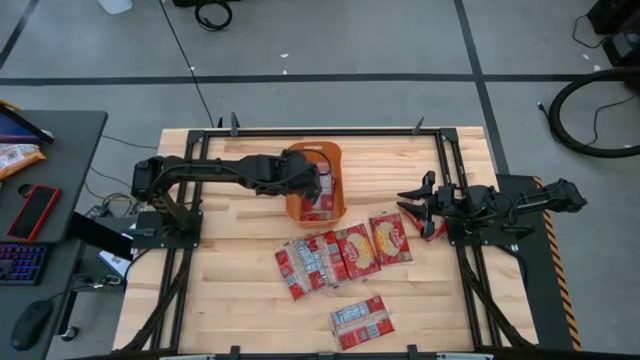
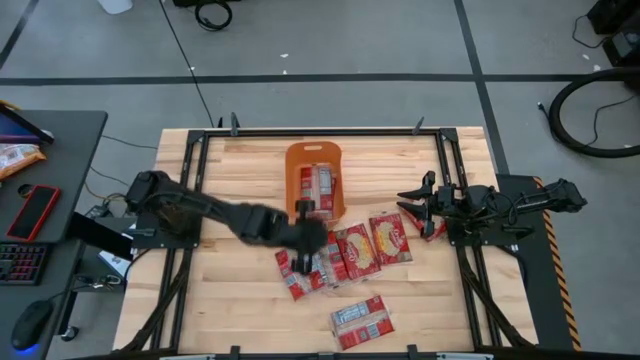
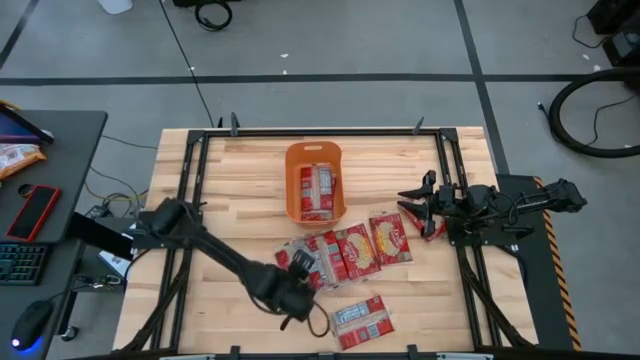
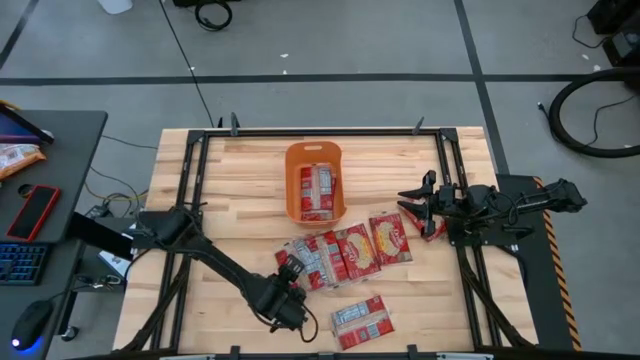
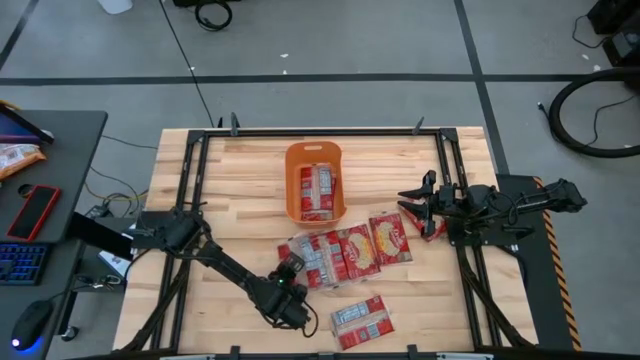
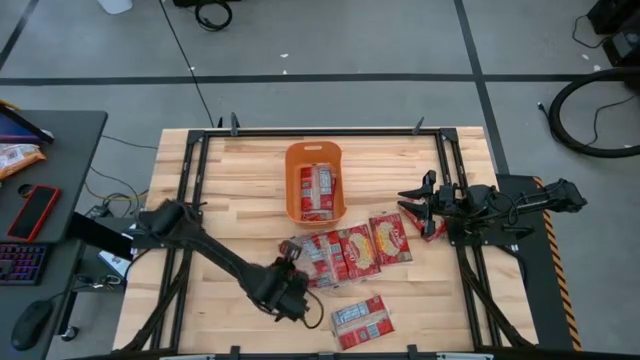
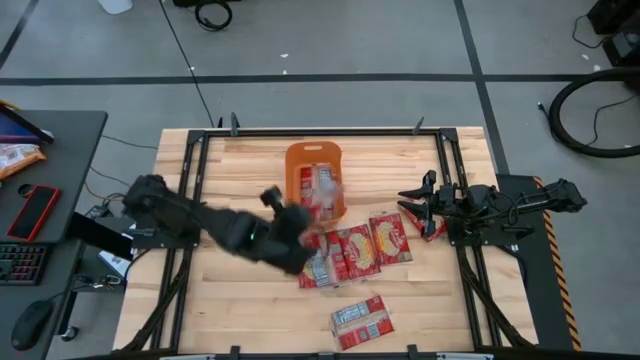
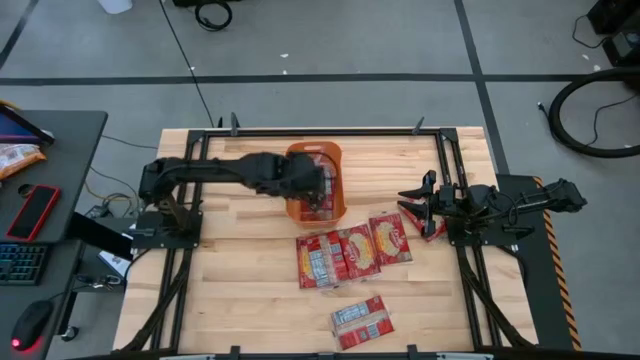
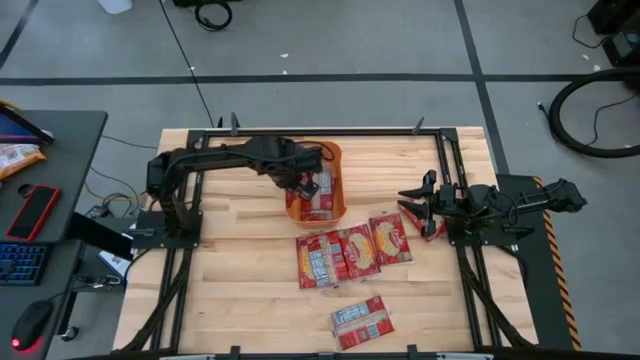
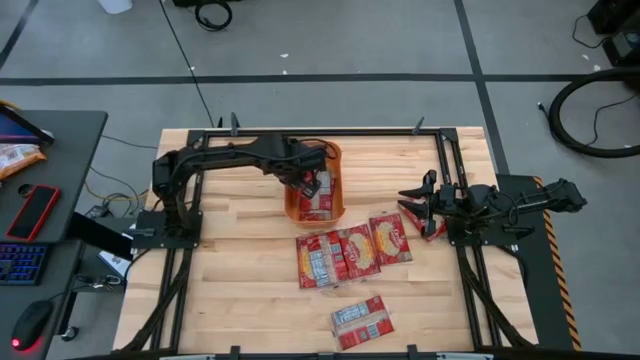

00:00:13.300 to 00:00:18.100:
Task: Sort popcorn bags into baskets
Put the popcorn bag into the orange bin

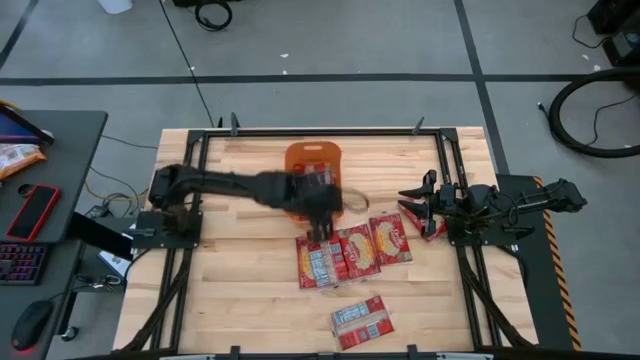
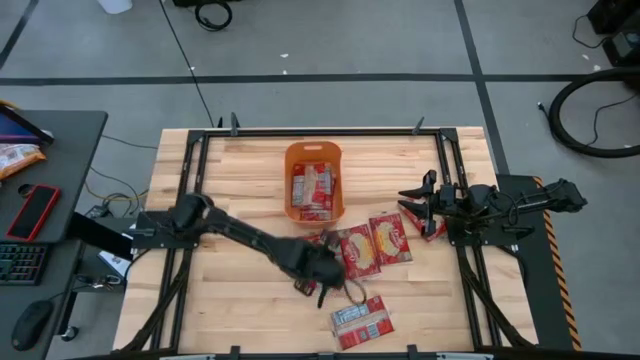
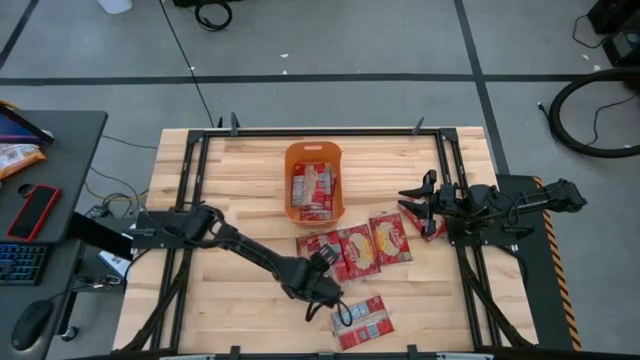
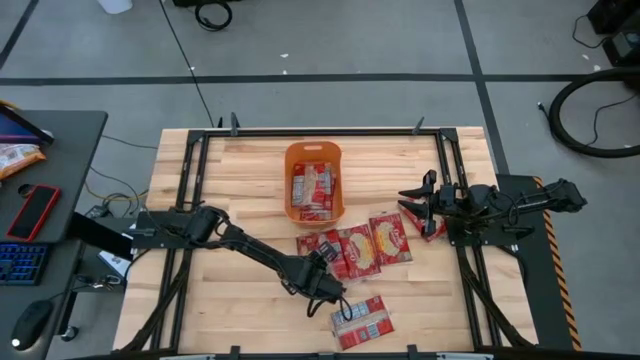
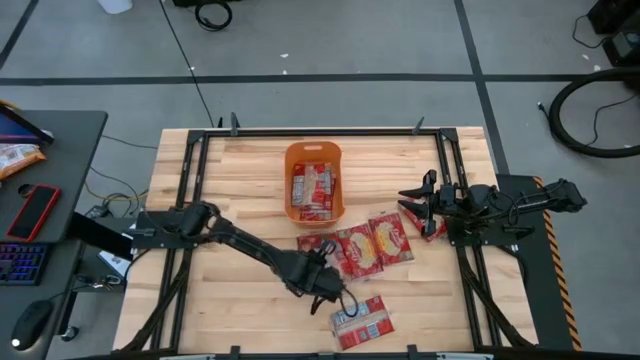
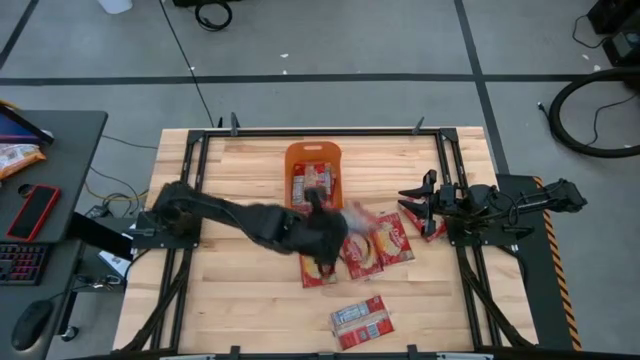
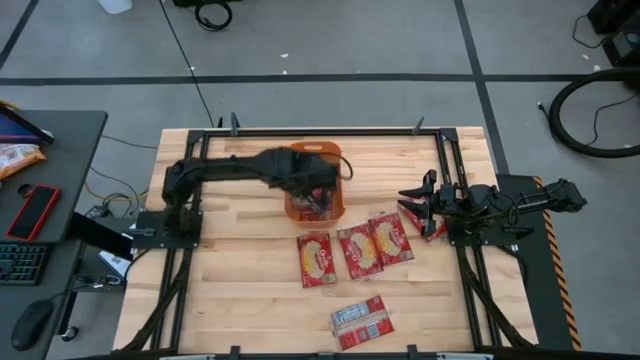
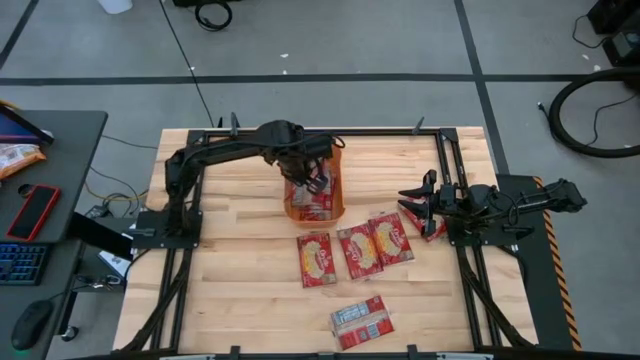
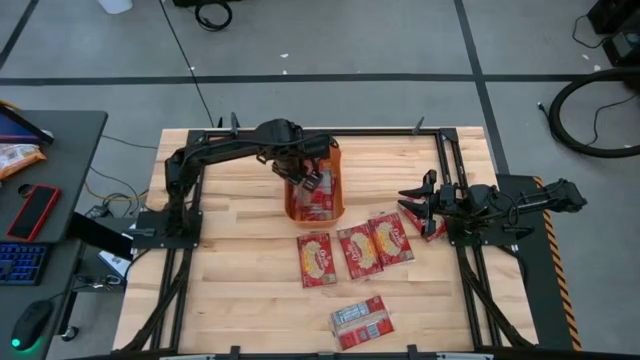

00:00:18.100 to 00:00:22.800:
Put the popcorn bag into the orange bin

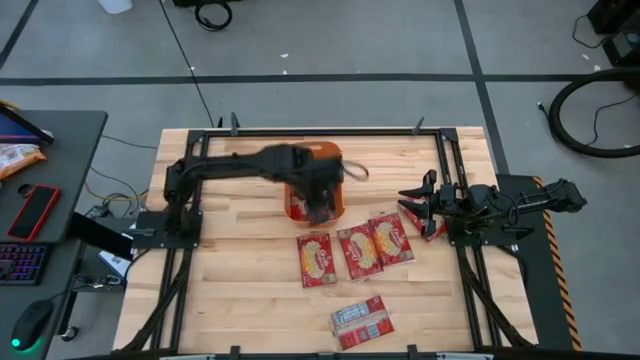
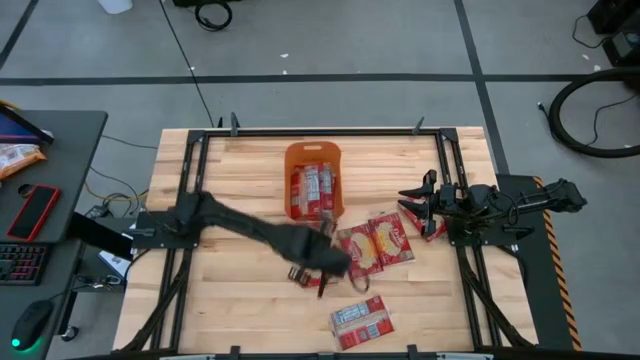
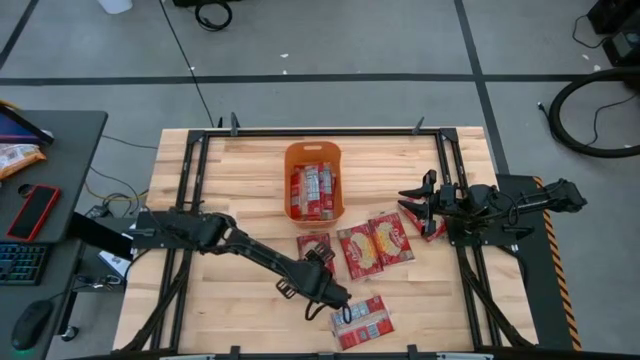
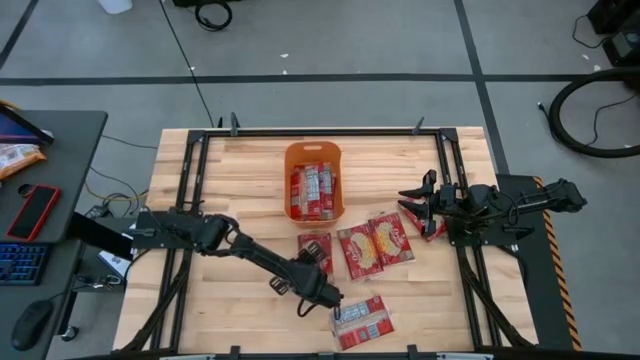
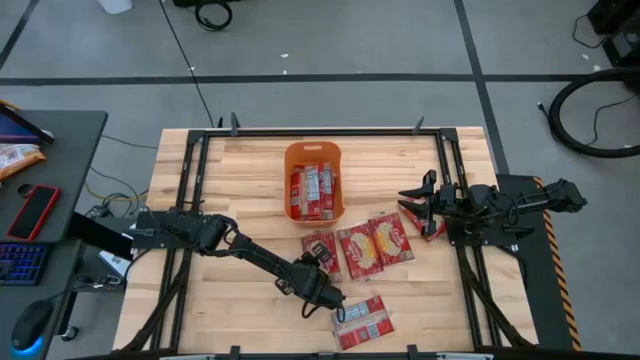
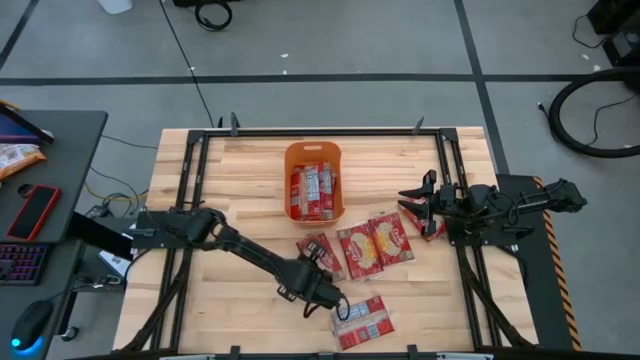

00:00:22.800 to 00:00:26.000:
Put the popcorn bag into the orange bin

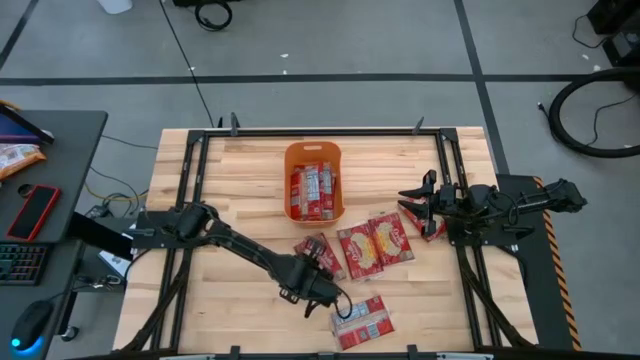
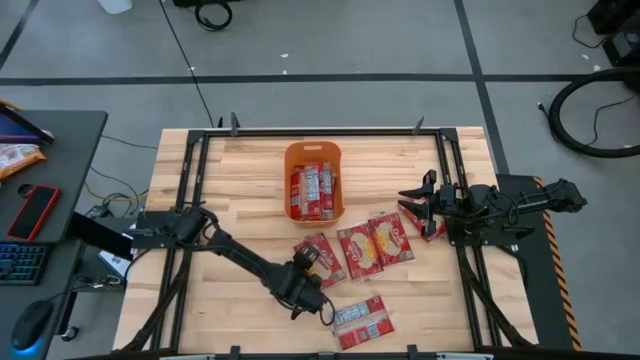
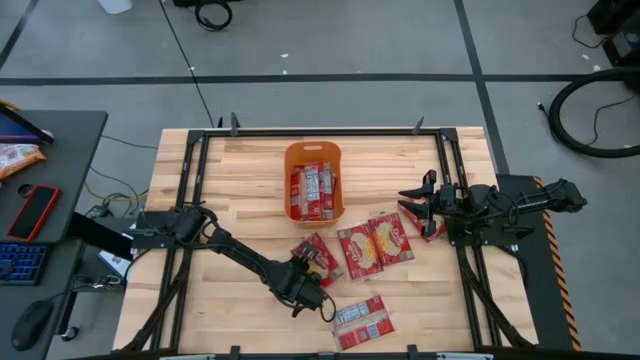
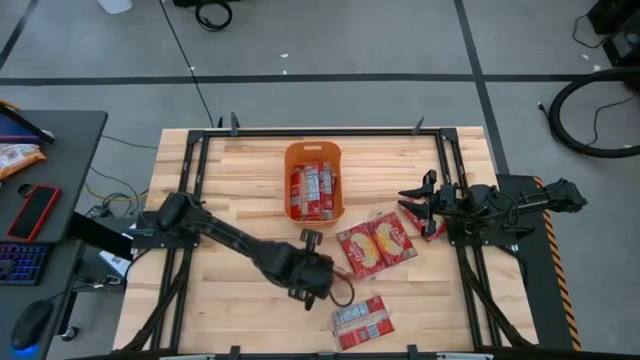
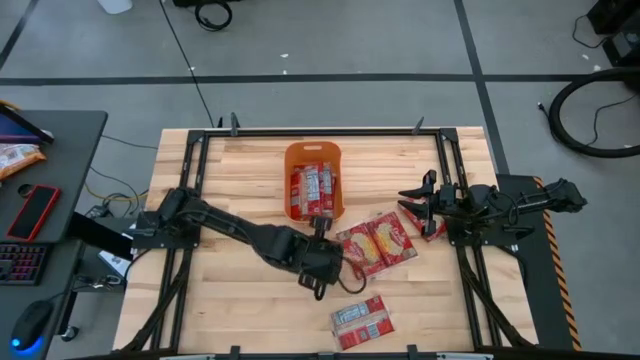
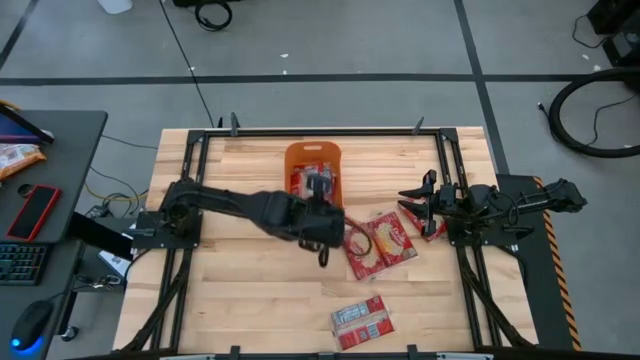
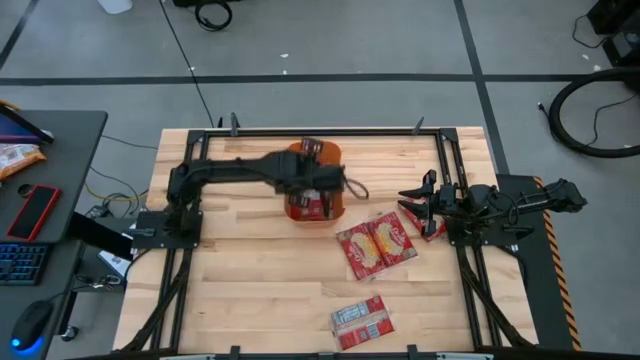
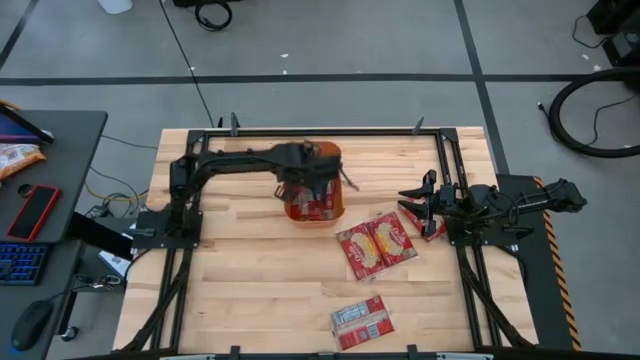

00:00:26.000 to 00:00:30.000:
Put the popcorn bag into the orange bin

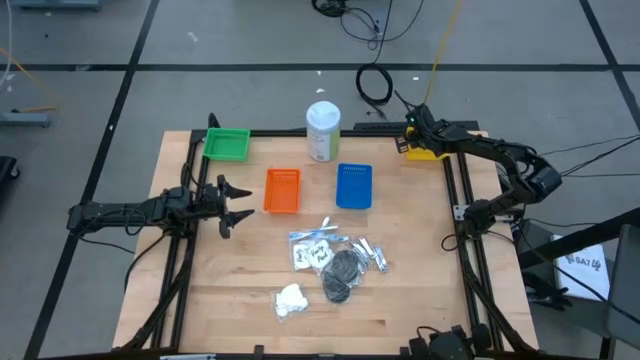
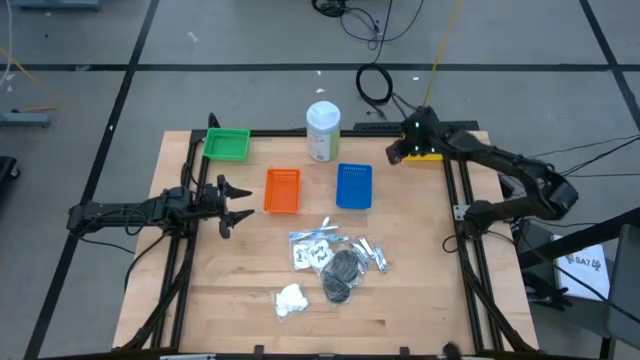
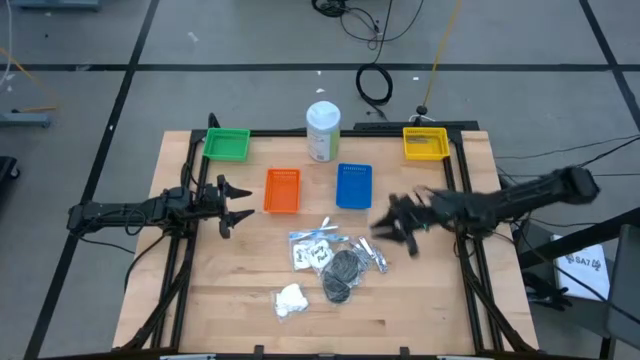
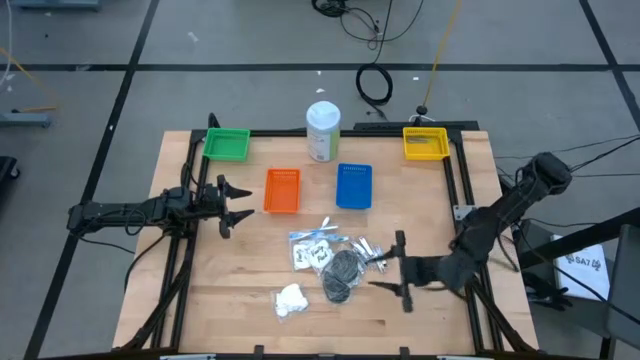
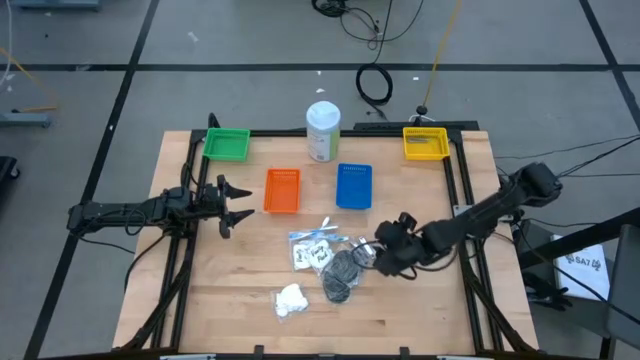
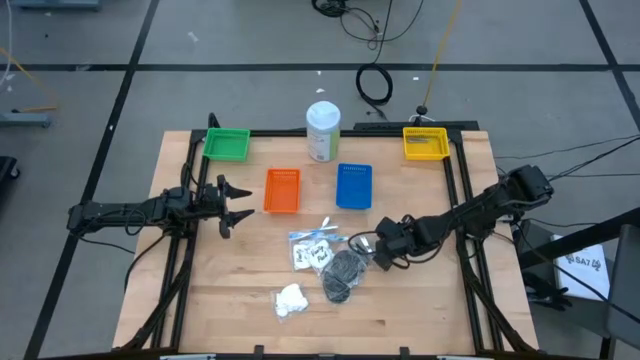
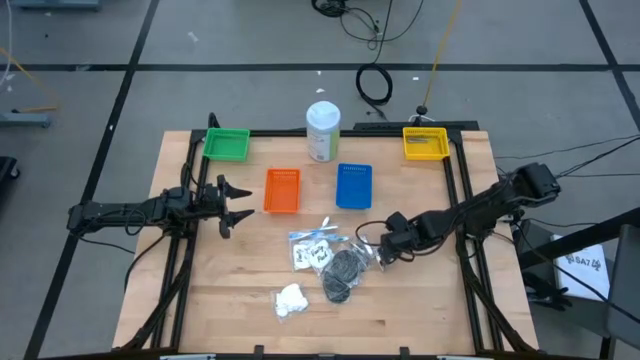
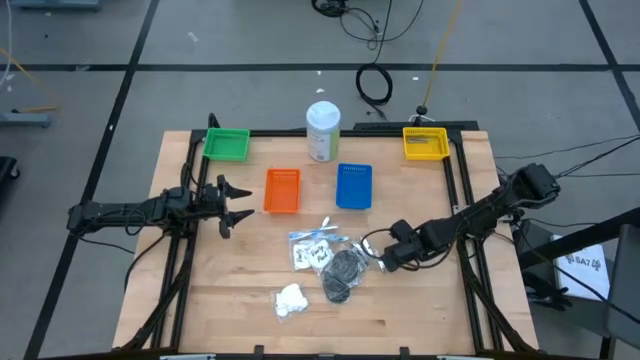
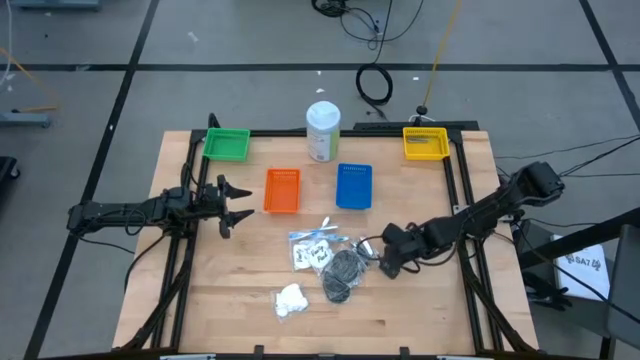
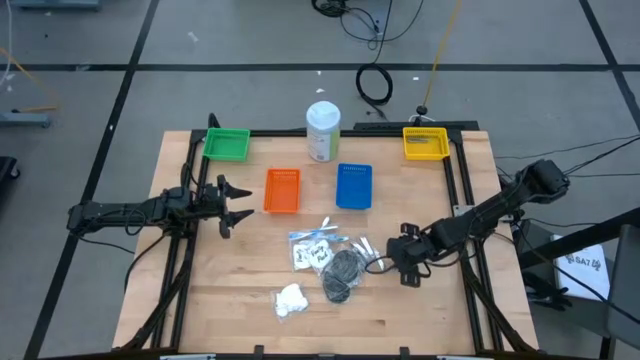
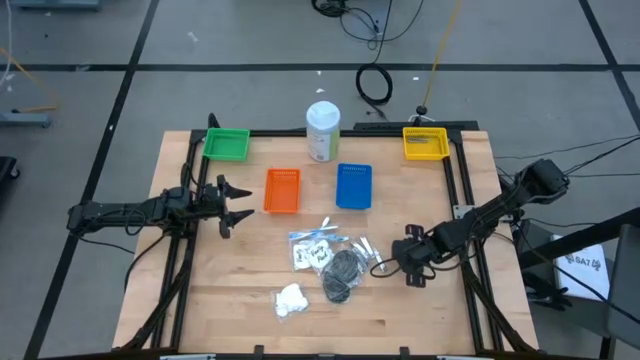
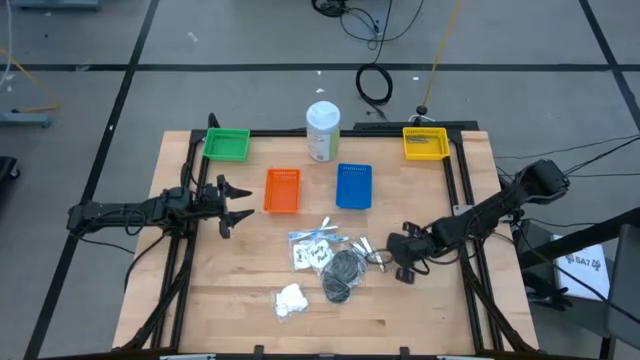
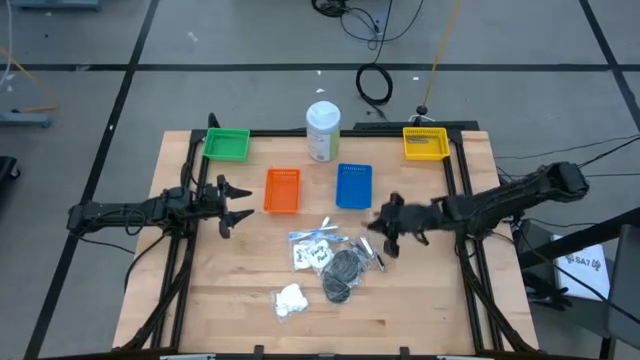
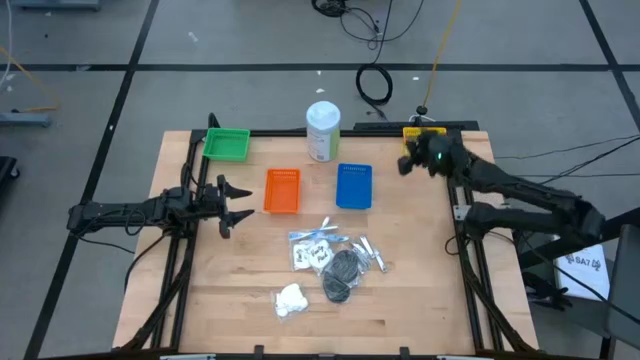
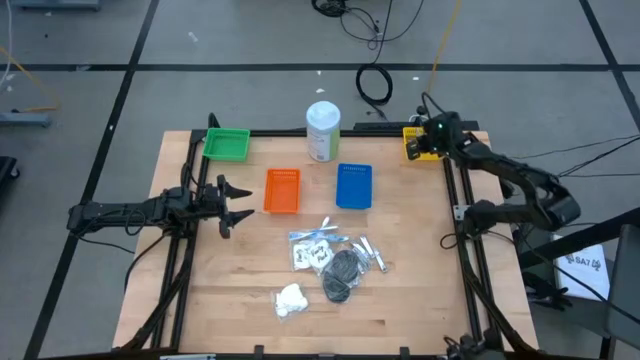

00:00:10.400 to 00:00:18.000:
Task: Pick & Place Travel size toiletries
Put the nail cutter into the yellow bin
